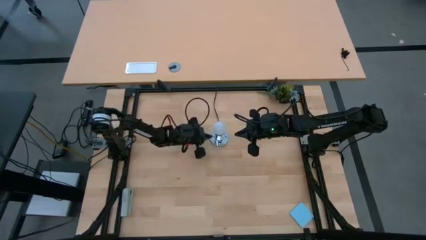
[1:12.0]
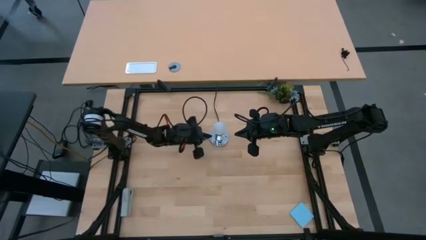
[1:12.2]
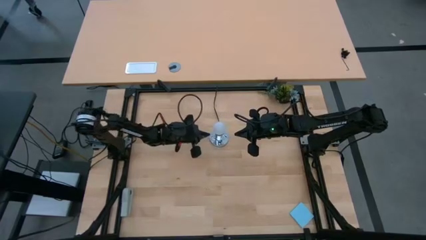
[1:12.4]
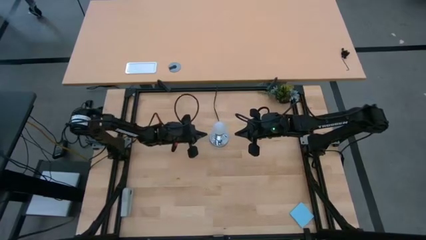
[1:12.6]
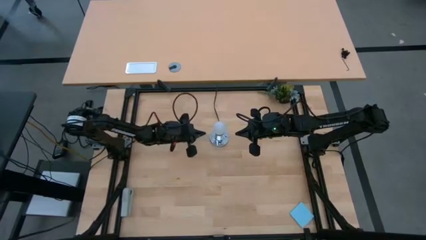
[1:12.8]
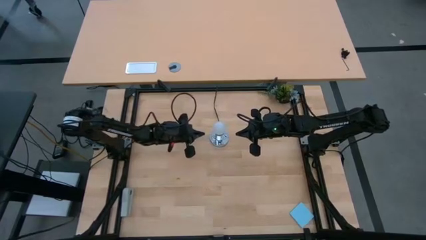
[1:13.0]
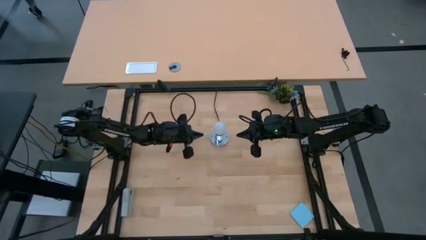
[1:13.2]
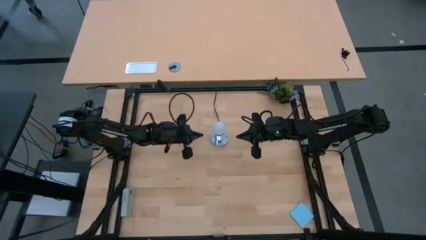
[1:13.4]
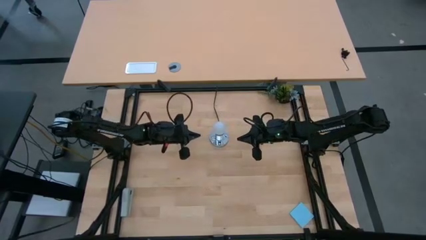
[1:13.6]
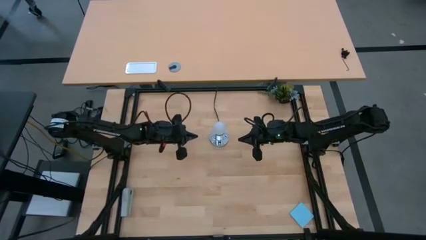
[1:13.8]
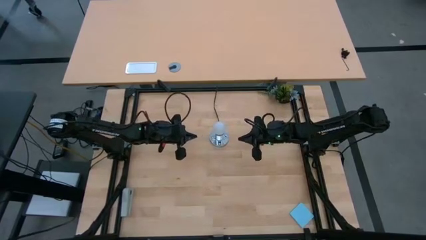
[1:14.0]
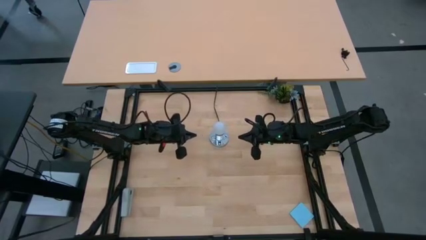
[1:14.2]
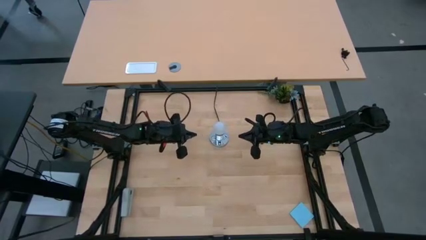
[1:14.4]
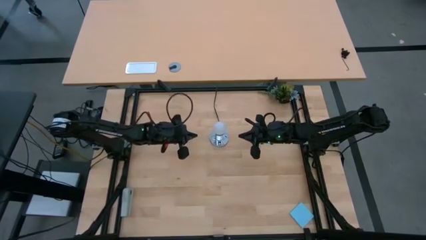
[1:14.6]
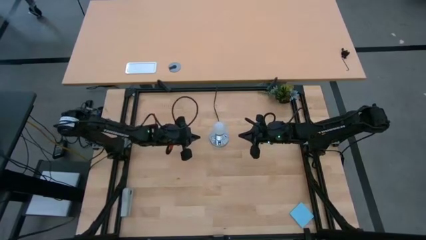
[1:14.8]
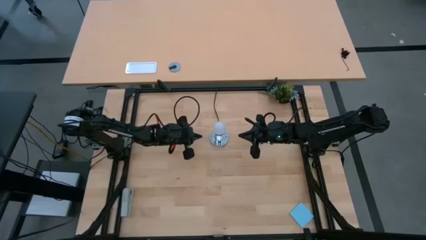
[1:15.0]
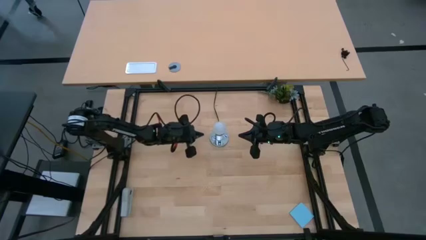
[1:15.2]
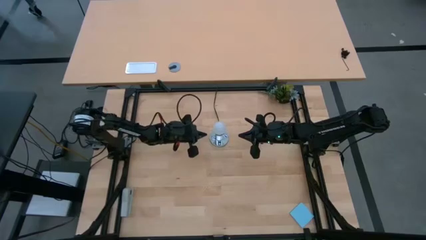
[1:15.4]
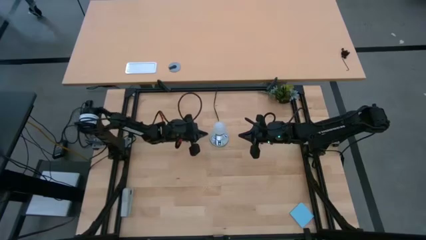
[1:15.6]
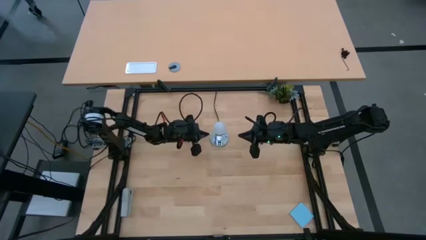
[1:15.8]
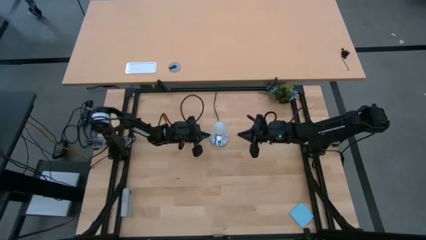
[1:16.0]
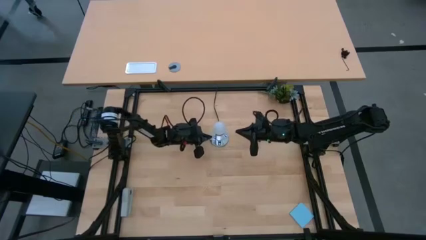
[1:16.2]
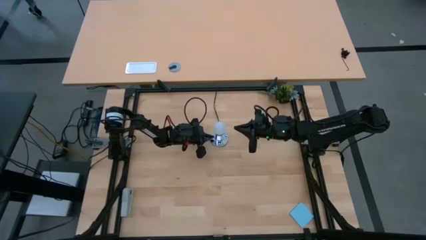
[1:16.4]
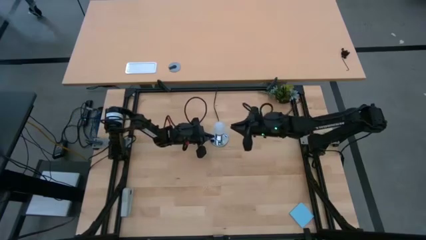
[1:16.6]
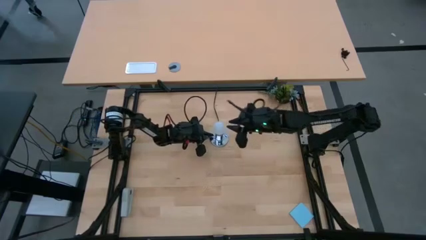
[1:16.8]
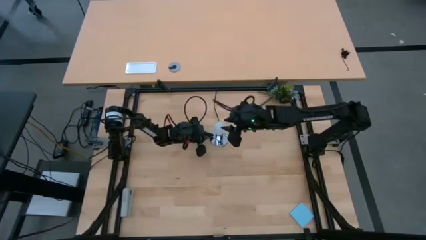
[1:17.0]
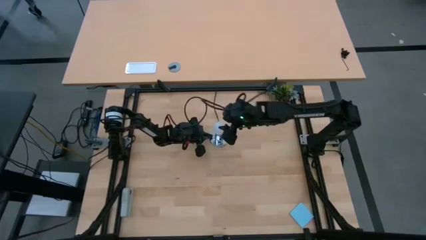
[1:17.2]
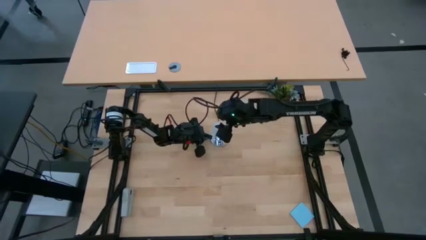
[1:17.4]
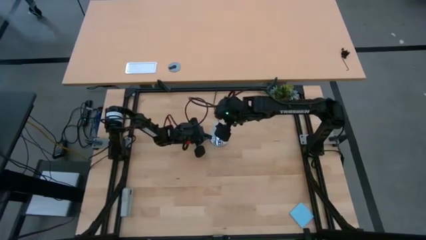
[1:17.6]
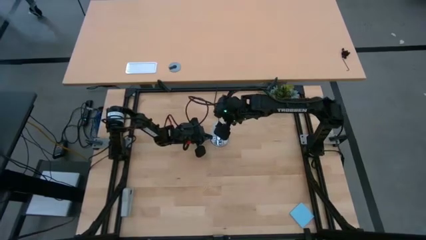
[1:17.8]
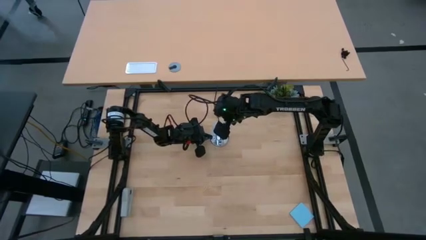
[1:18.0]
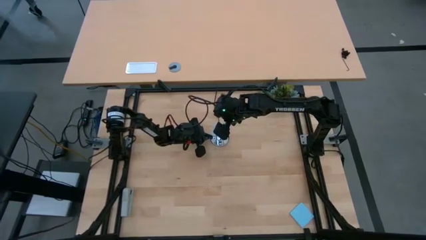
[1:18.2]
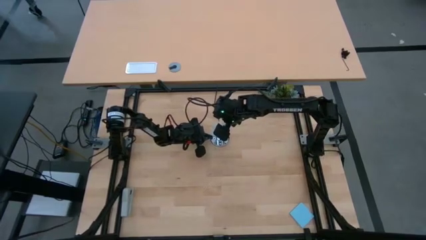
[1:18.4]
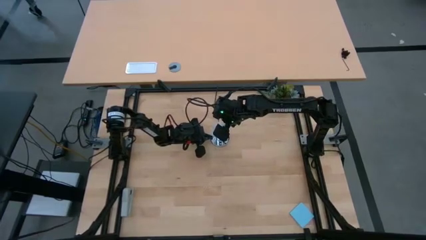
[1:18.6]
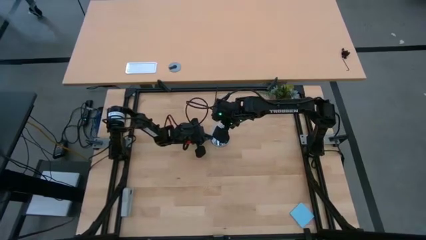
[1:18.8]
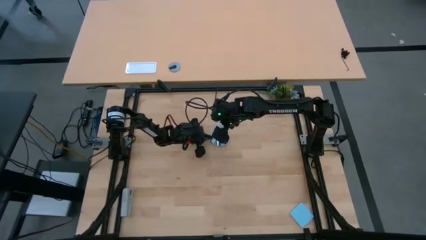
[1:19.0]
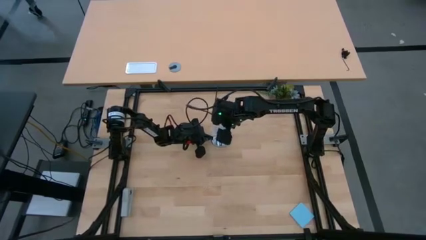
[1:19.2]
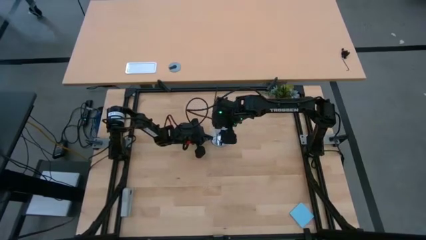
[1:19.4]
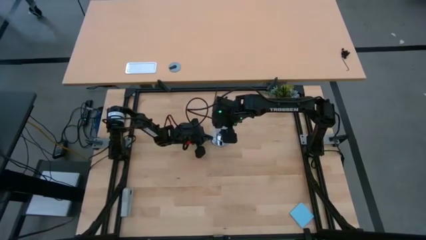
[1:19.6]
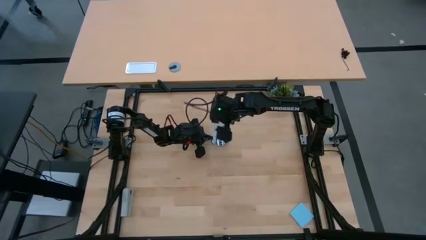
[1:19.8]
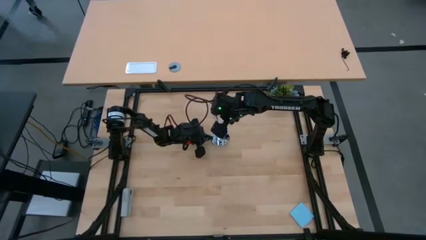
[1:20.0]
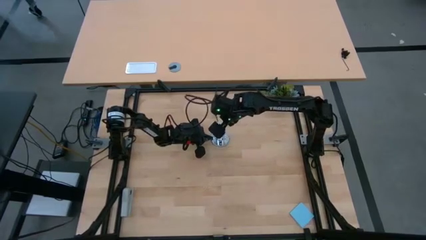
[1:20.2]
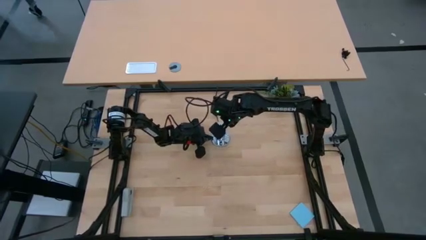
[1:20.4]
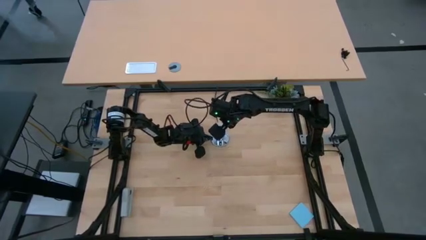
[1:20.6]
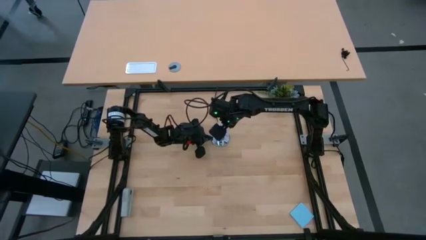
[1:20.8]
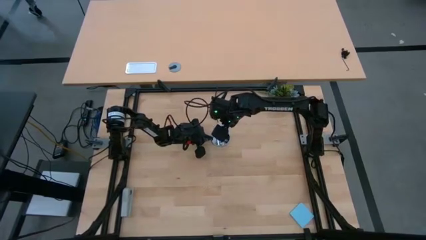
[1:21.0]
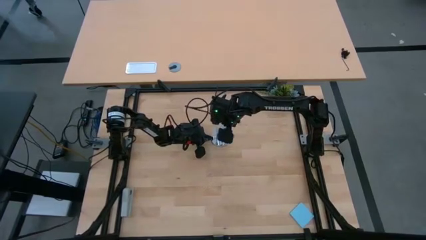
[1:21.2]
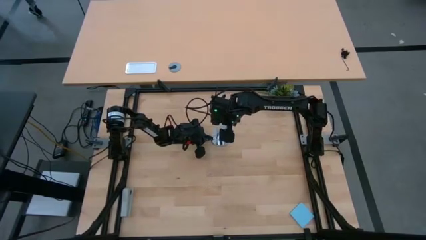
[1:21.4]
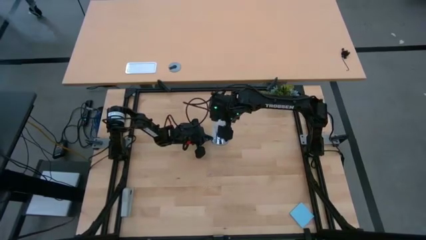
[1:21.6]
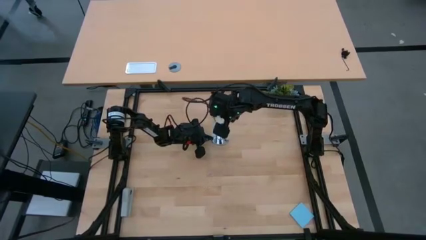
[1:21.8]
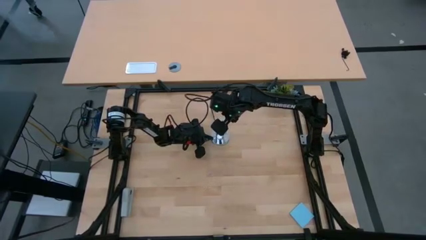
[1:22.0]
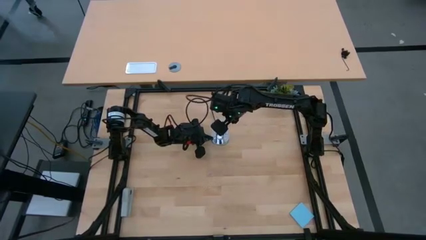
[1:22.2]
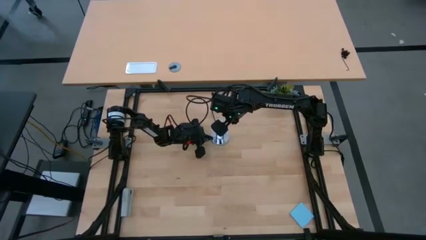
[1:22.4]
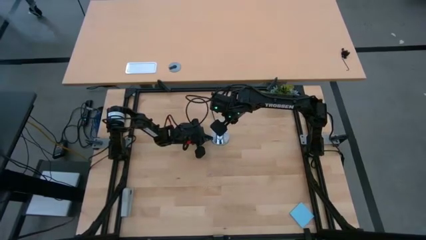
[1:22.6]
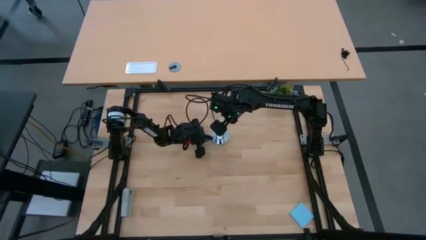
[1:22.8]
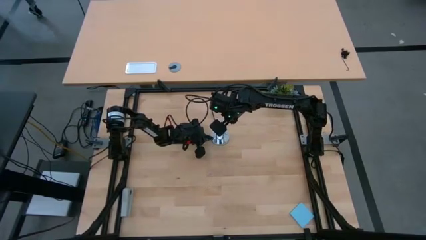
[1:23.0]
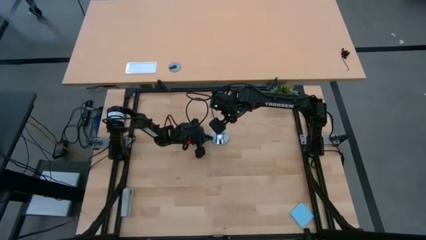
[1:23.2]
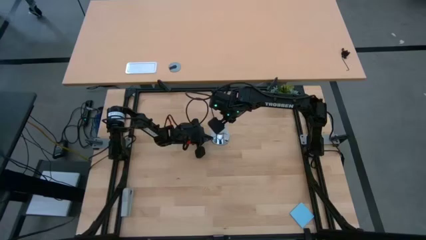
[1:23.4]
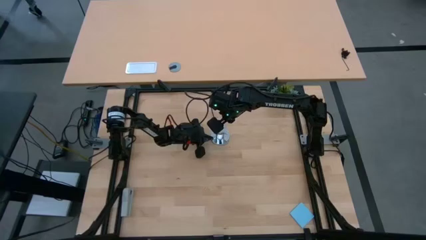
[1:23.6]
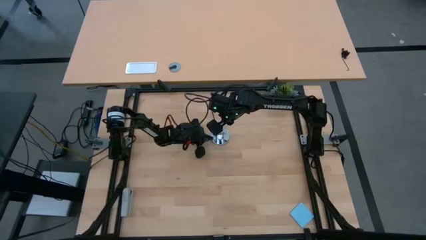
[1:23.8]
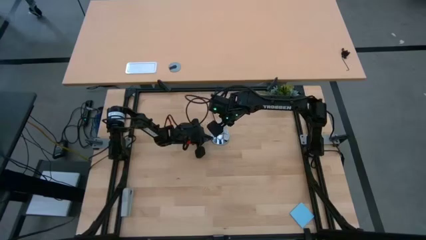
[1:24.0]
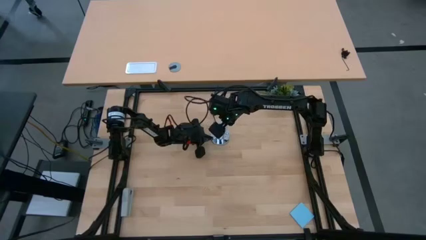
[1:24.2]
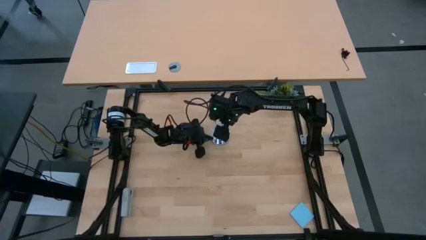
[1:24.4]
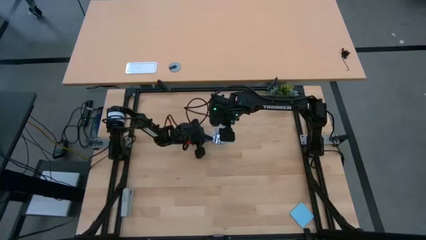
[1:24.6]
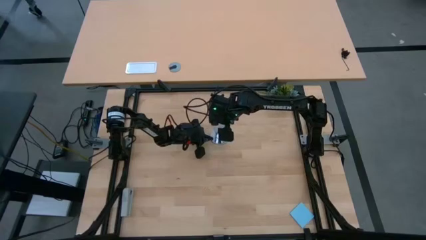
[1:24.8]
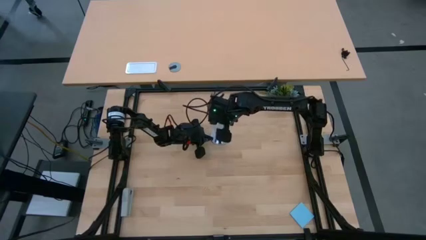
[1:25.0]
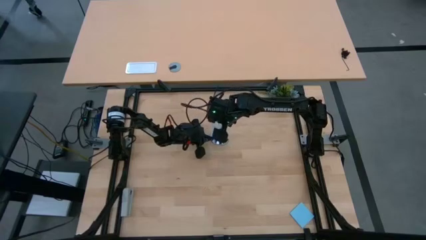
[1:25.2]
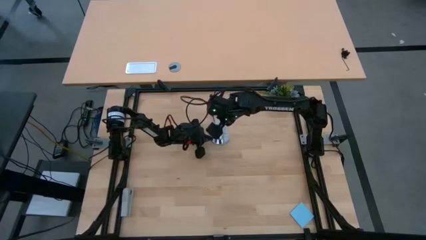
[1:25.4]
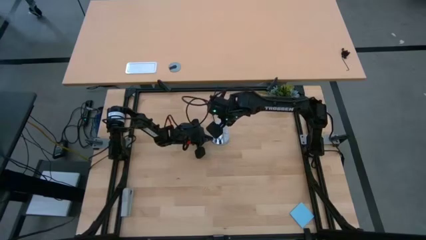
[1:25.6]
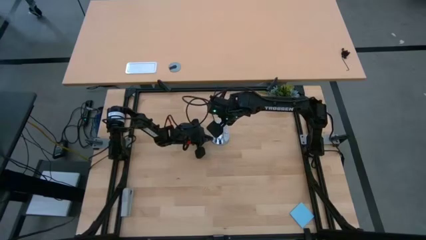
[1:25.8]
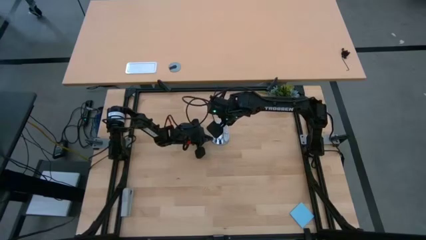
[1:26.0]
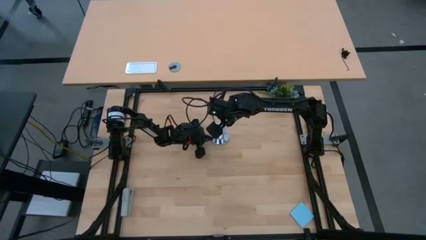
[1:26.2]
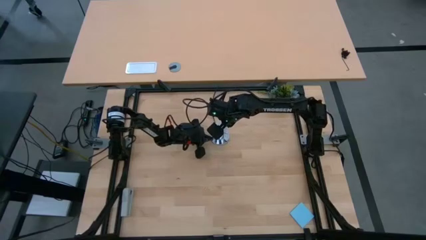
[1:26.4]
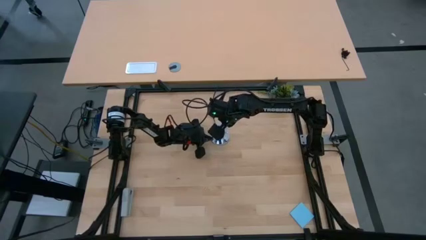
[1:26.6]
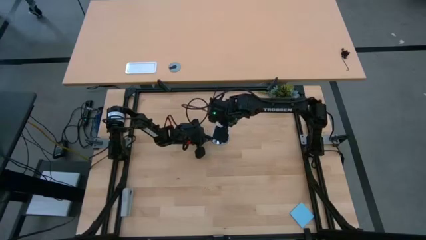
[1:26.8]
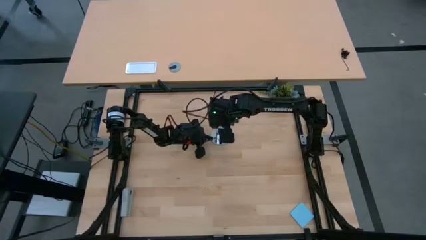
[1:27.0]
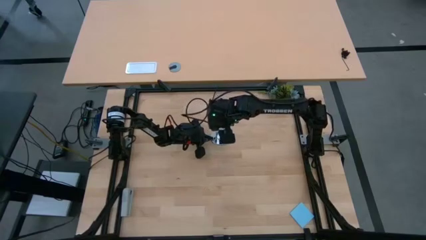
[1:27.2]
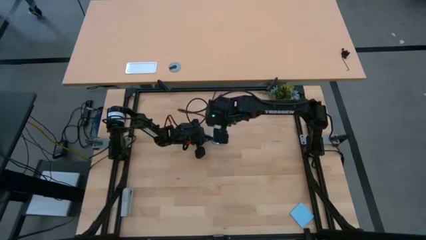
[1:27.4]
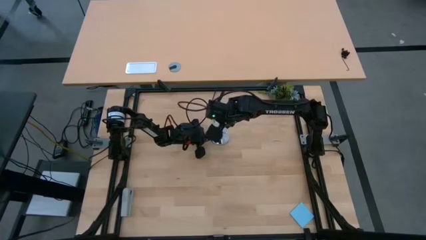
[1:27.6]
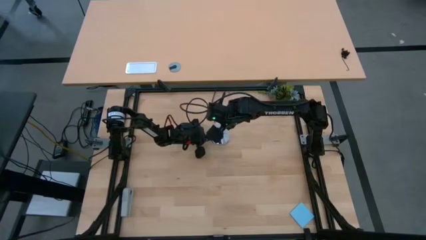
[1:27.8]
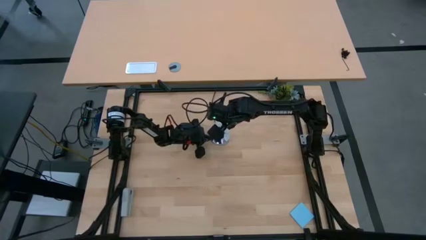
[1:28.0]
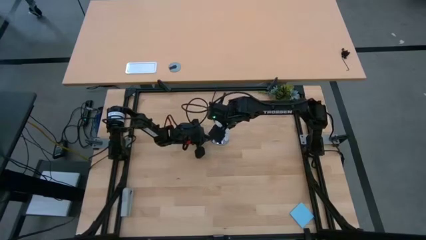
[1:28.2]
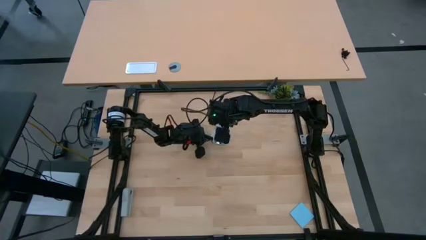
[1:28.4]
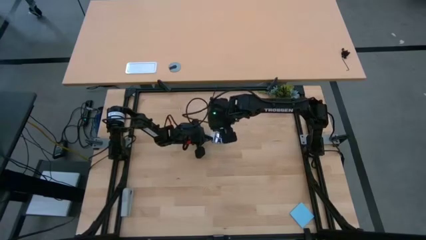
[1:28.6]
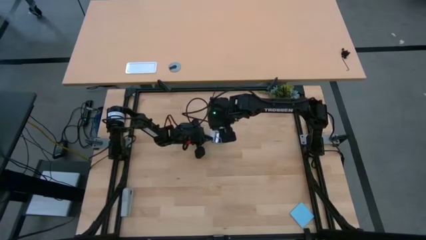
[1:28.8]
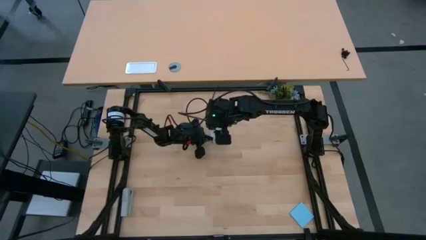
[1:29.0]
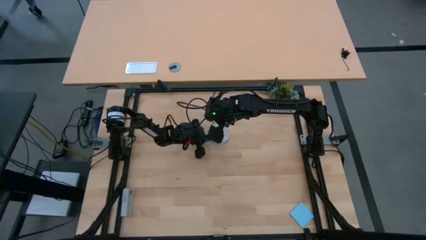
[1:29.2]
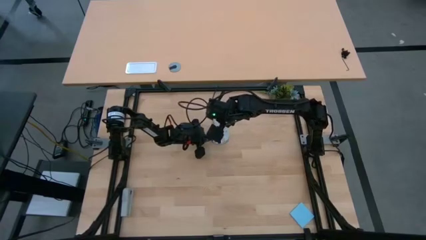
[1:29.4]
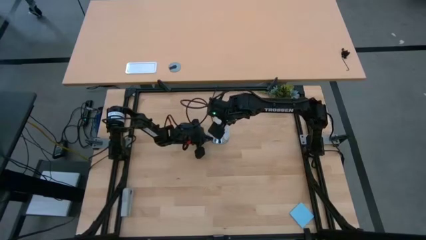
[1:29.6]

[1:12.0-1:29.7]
Task: Screw lightbulb
Remove the lightbulb from the lamp socket
